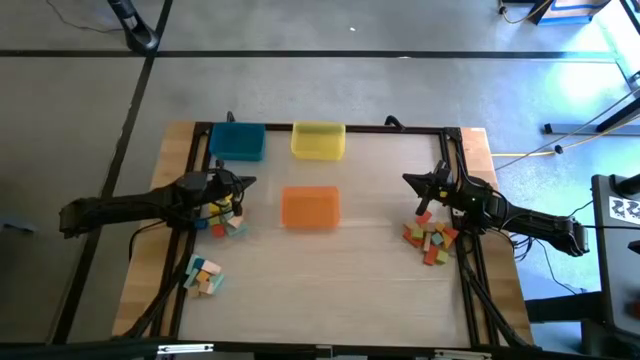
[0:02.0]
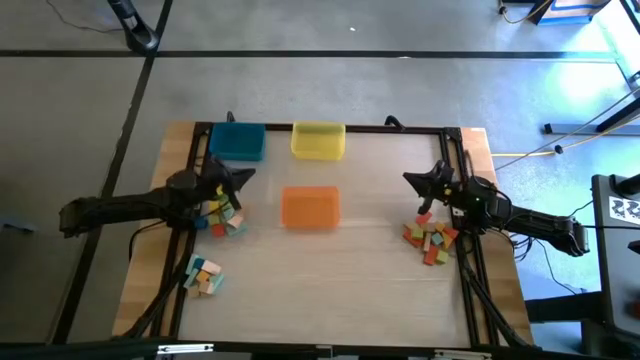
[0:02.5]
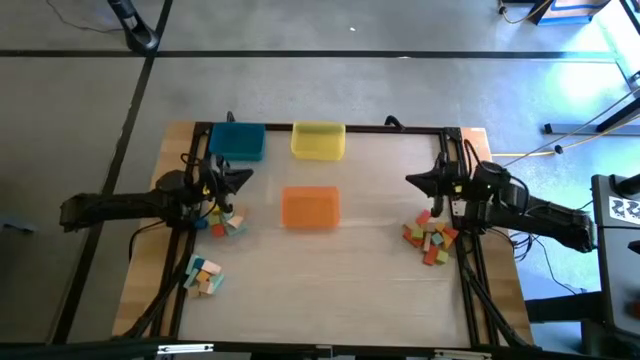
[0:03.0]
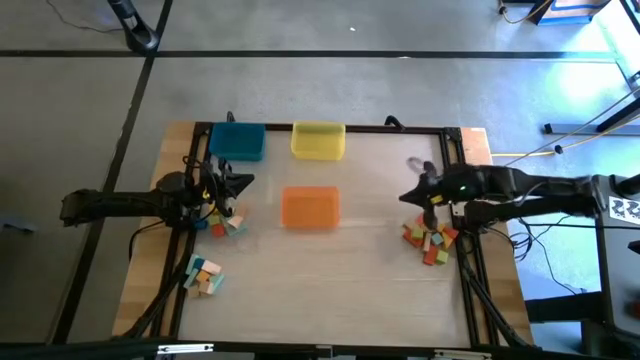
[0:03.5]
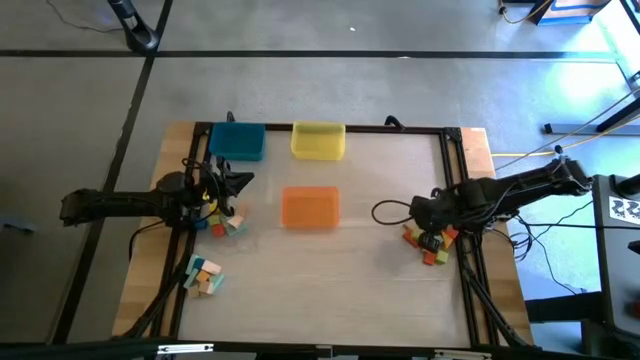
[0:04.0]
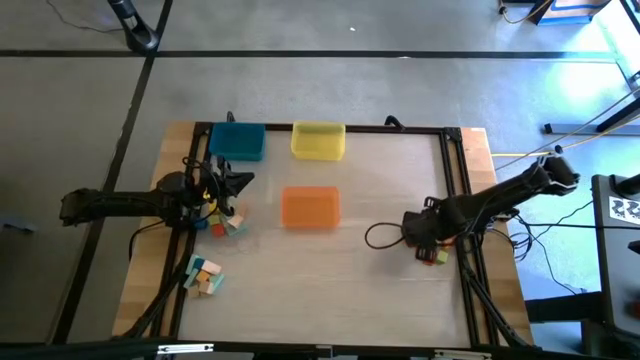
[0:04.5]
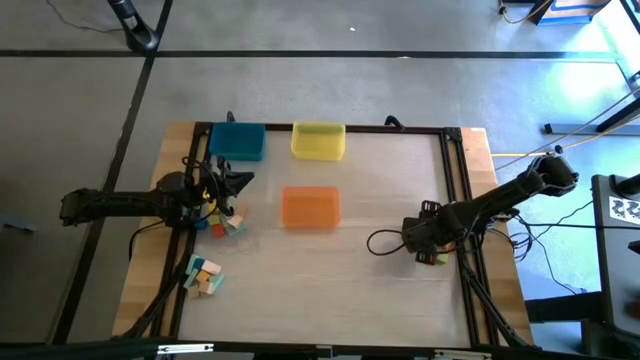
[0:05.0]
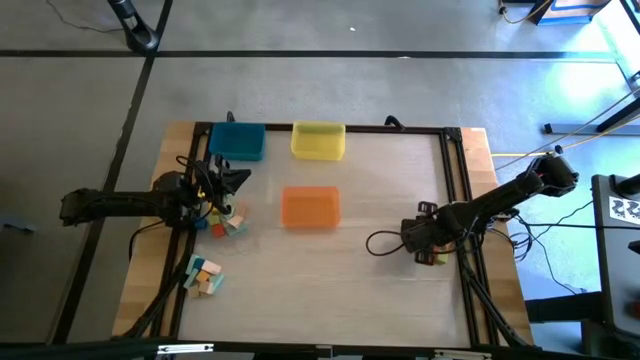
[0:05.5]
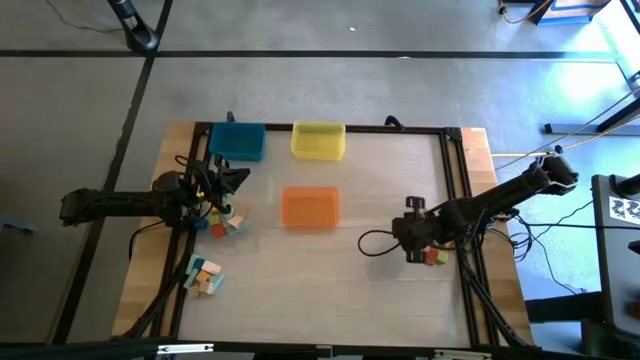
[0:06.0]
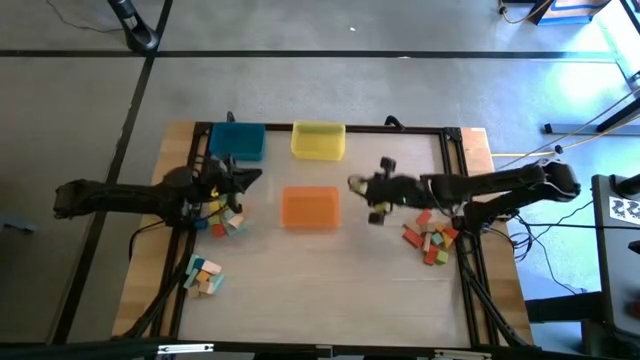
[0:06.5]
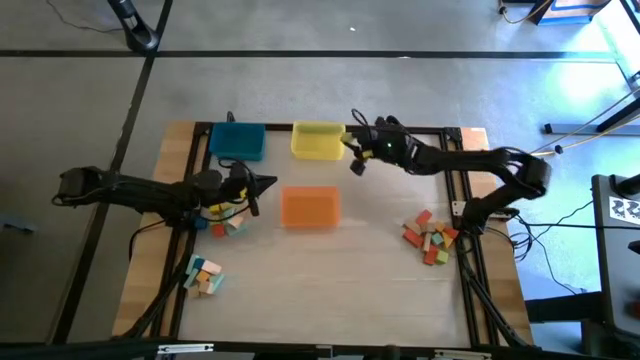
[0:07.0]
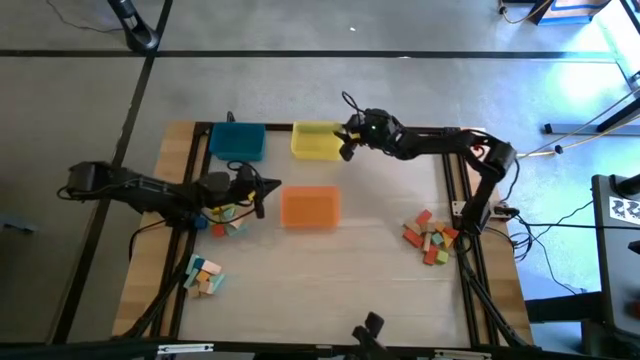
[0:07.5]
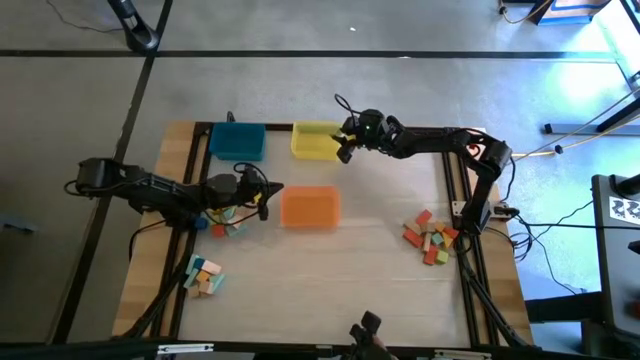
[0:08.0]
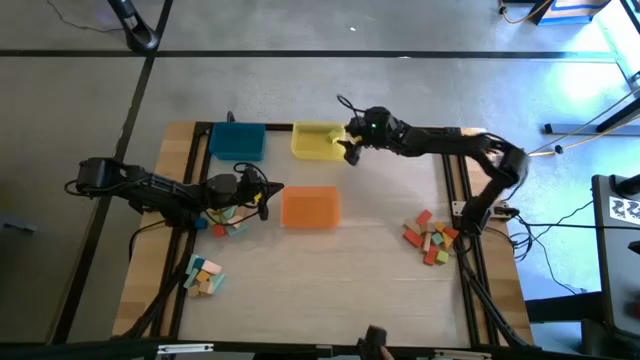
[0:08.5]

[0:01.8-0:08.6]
Task: Sort blocks by size
Put the green square block into the yellow bin

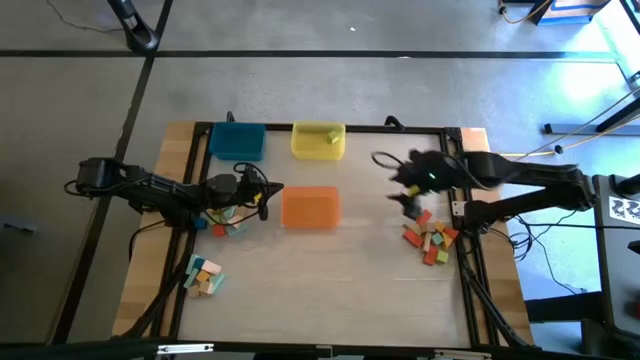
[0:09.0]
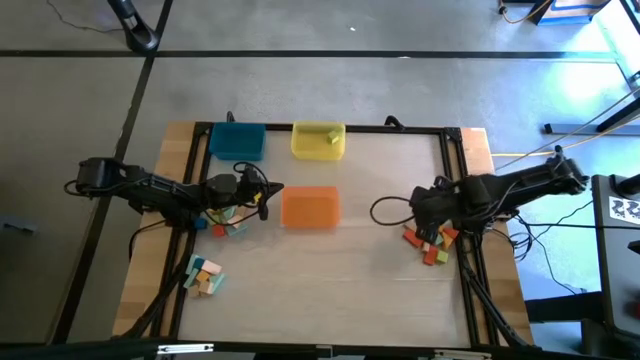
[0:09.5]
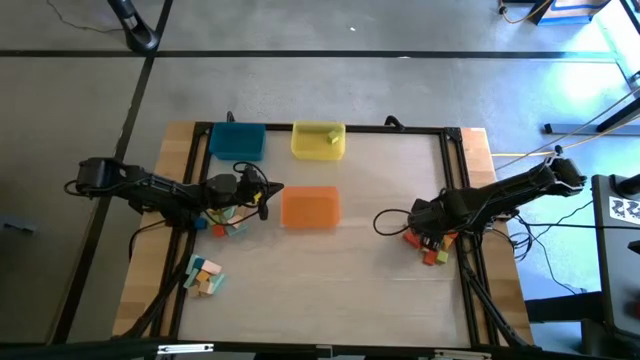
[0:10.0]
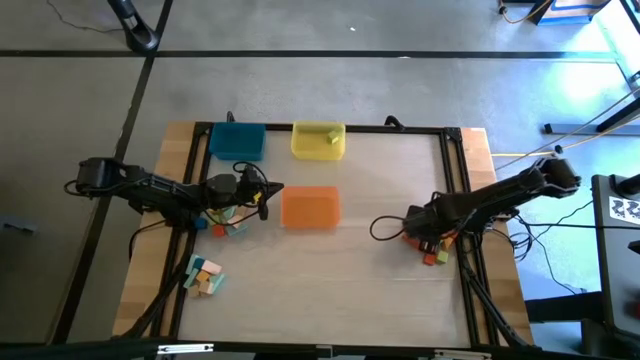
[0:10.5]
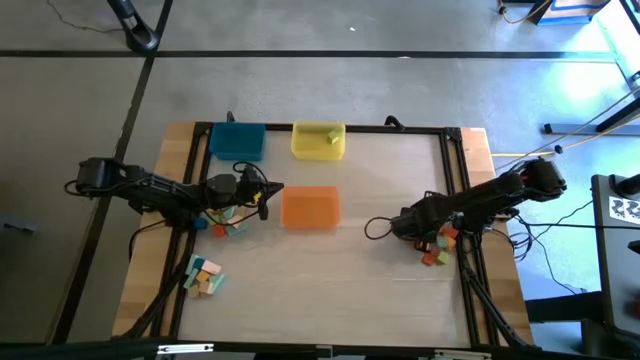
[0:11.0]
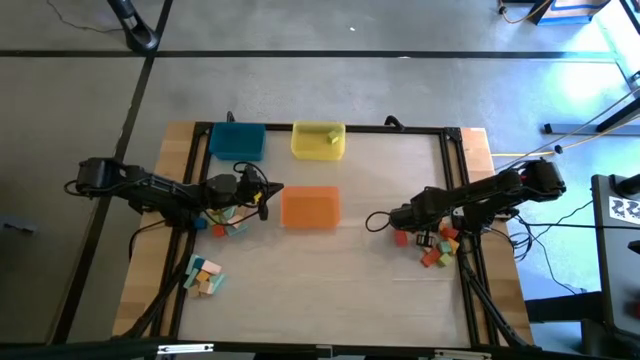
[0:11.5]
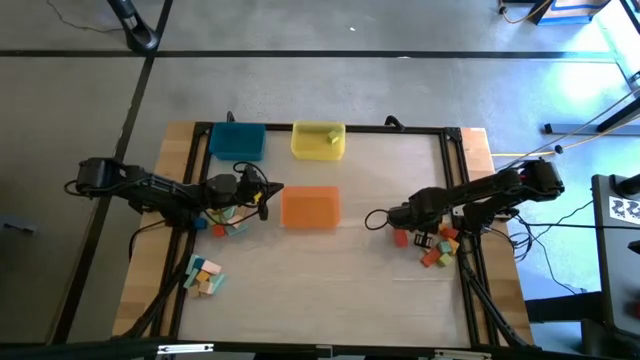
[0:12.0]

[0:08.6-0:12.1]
Put the brown square block into the yellow bin

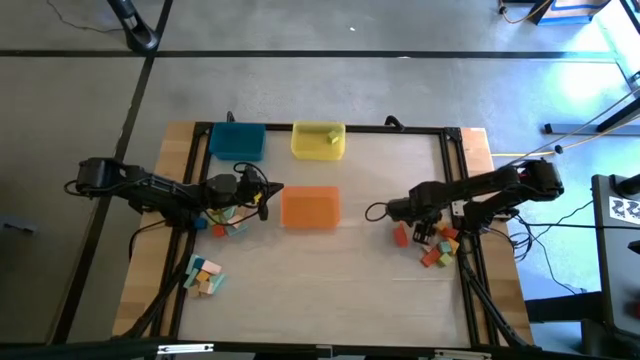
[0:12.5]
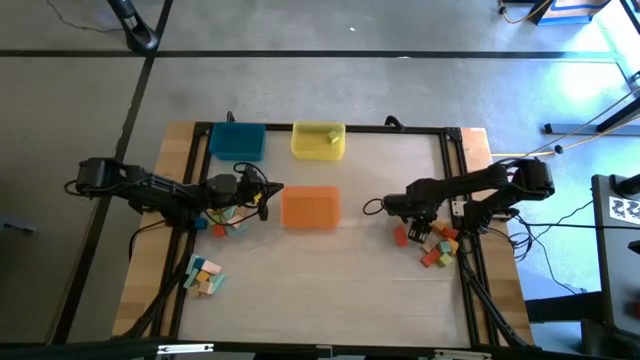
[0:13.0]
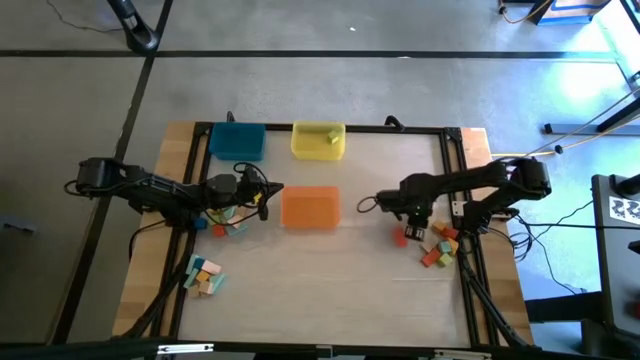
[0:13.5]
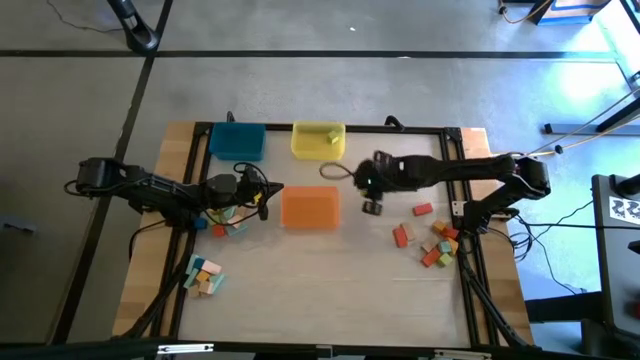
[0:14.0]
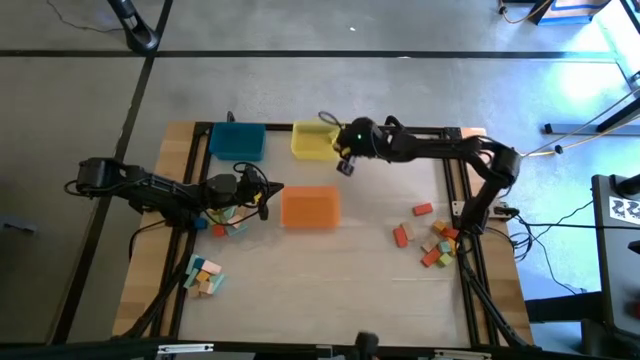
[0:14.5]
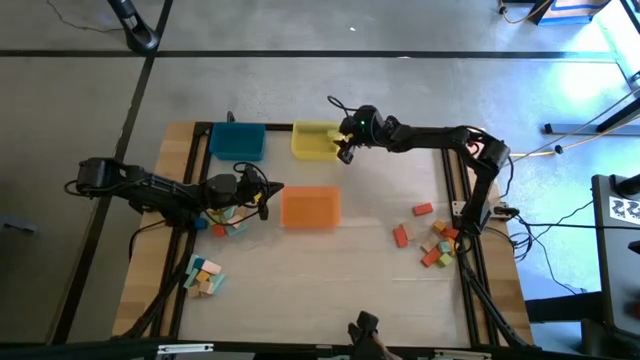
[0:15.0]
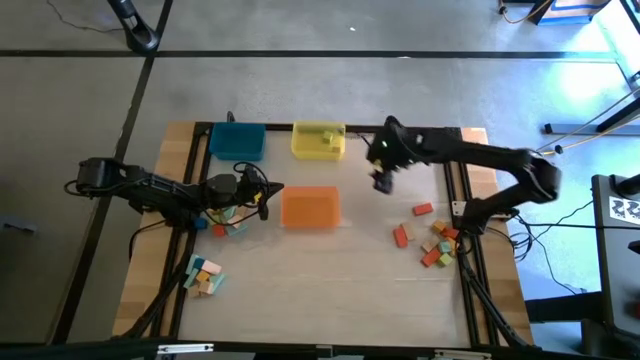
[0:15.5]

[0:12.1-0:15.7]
Put the brown square block into the yellow bin

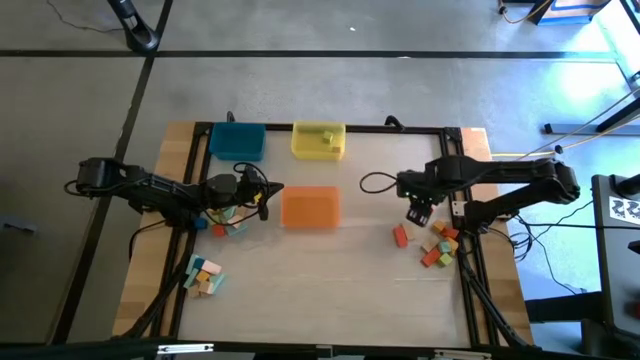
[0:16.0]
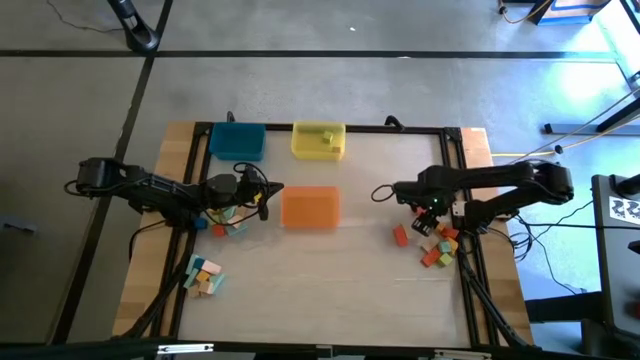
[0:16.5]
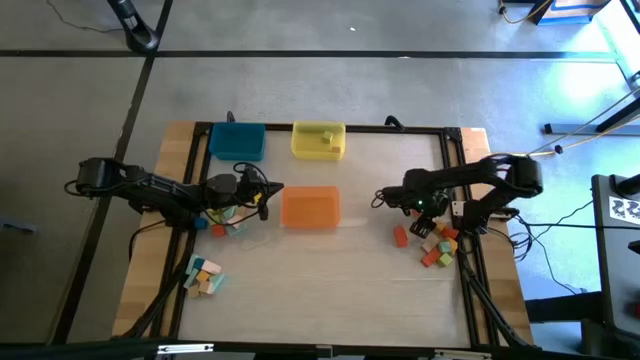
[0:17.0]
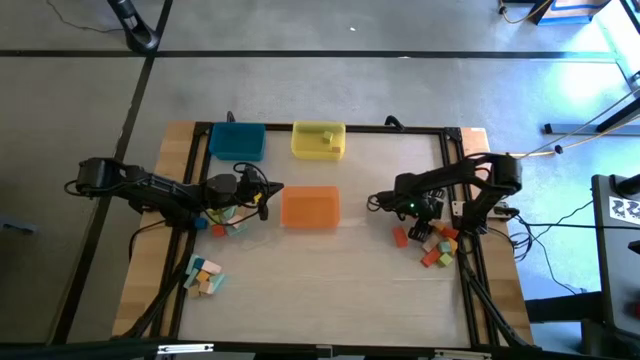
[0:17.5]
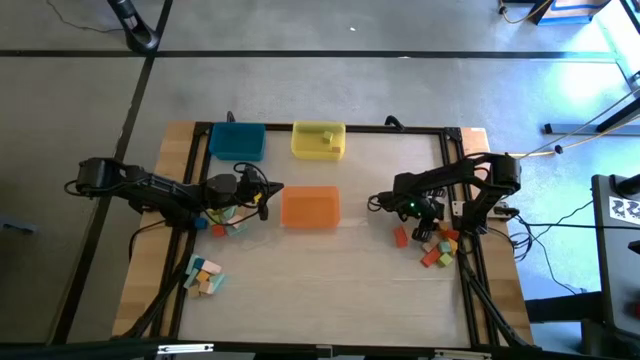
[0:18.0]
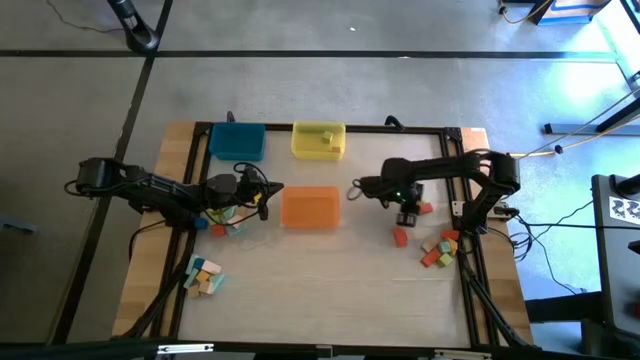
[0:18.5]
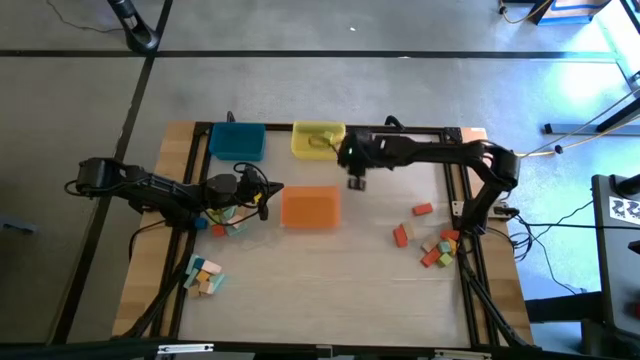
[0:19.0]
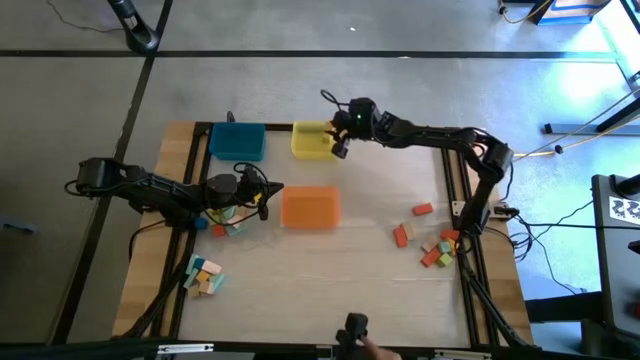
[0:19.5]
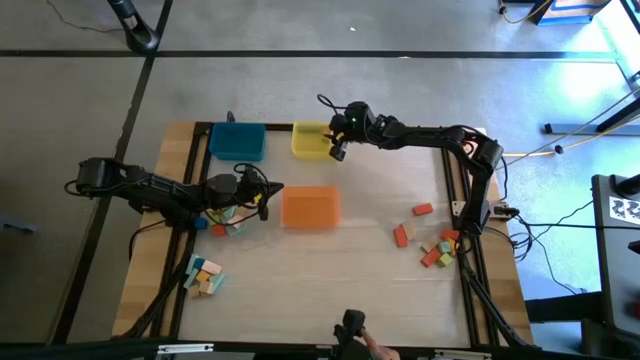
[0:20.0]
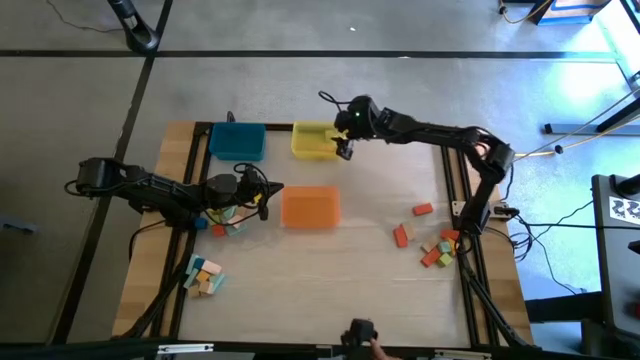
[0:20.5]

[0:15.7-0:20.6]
Put the yellow square block into the yellow bin

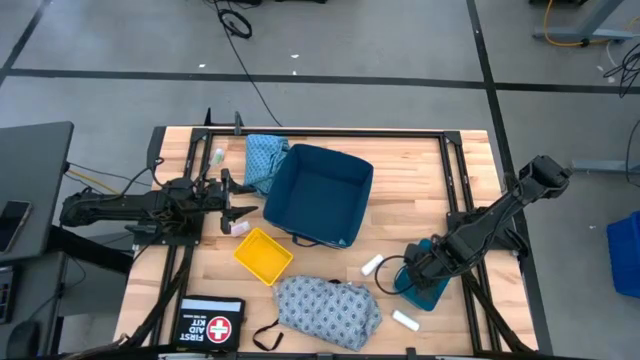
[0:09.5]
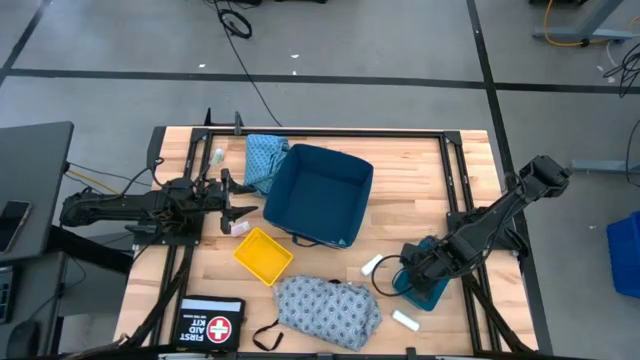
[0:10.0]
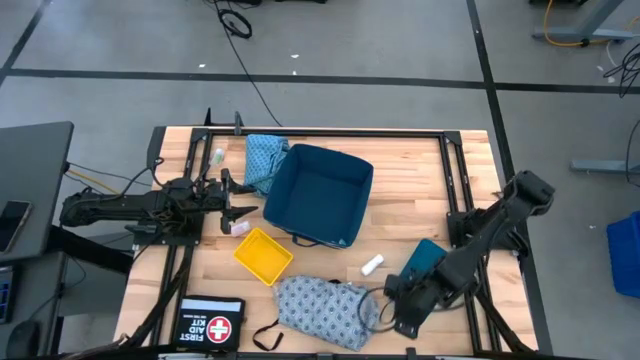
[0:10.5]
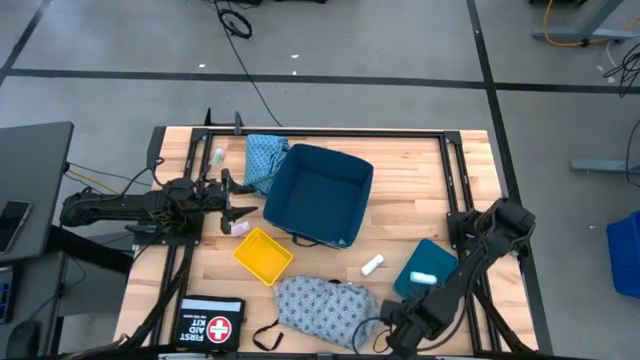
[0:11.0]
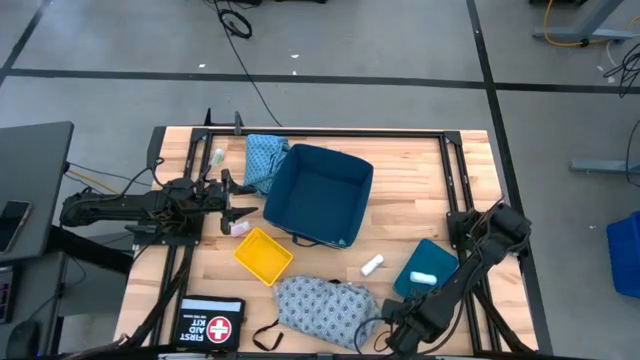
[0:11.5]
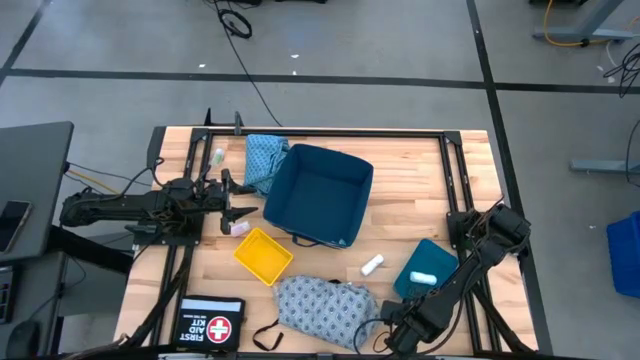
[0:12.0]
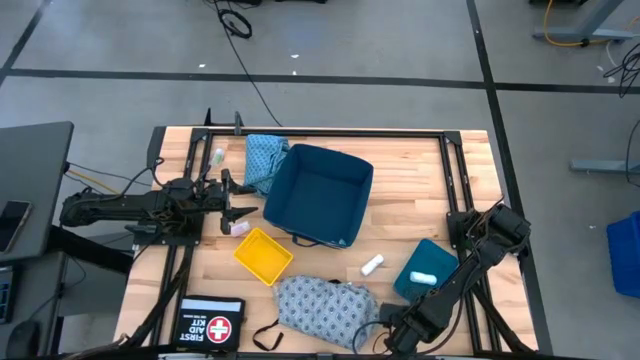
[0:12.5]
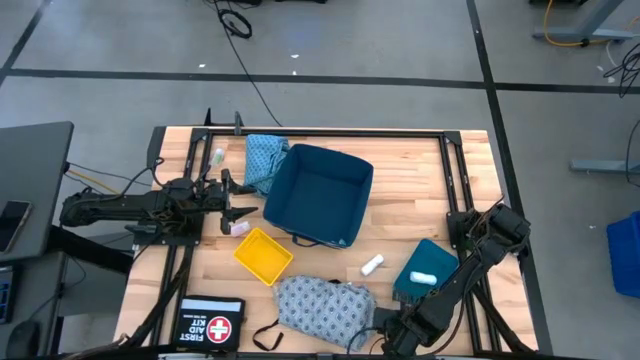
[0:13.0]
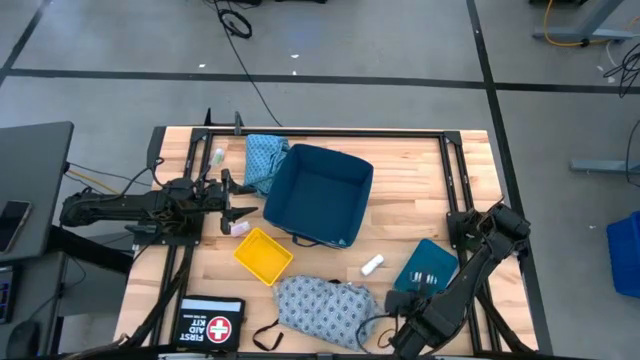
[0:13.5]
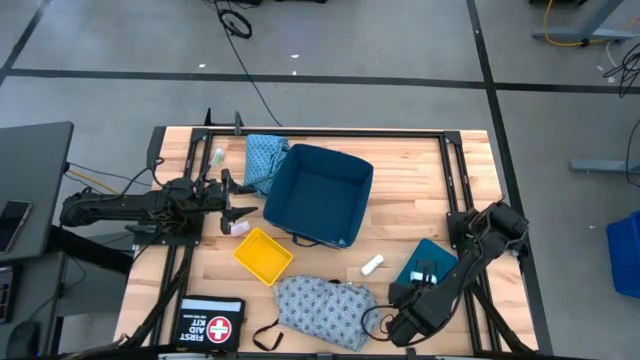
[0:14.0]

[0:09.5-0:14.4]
Task: Pick & place medical supplies in basket/bin
Put the bottom white bandage into the blue bin
